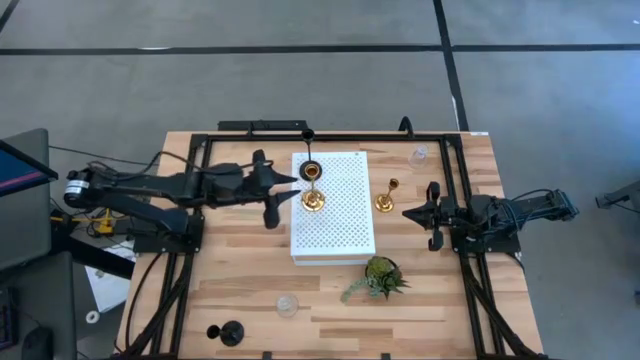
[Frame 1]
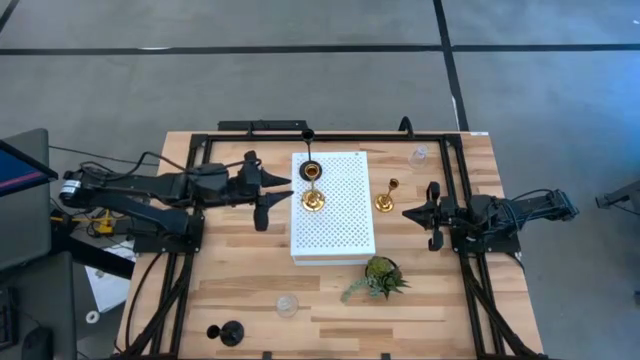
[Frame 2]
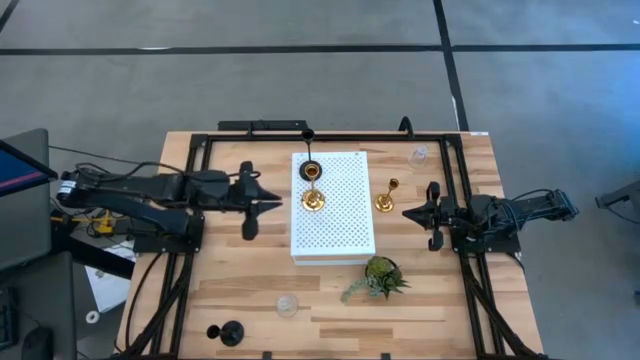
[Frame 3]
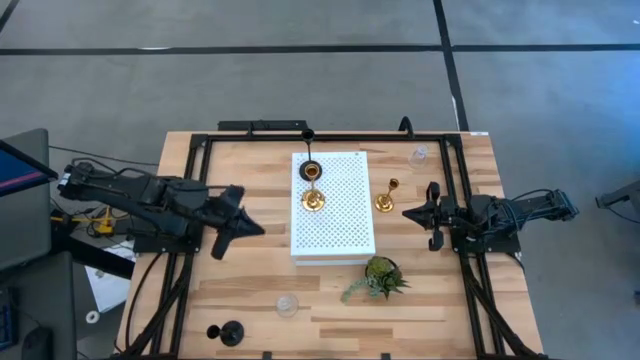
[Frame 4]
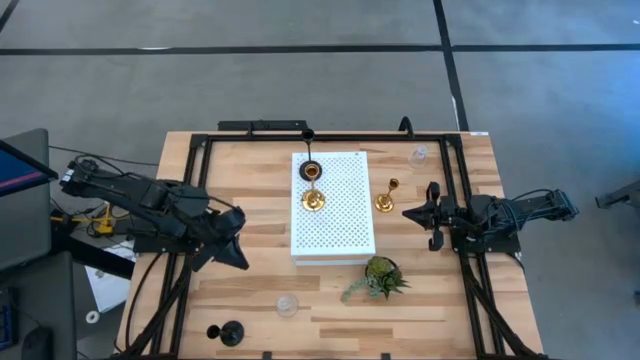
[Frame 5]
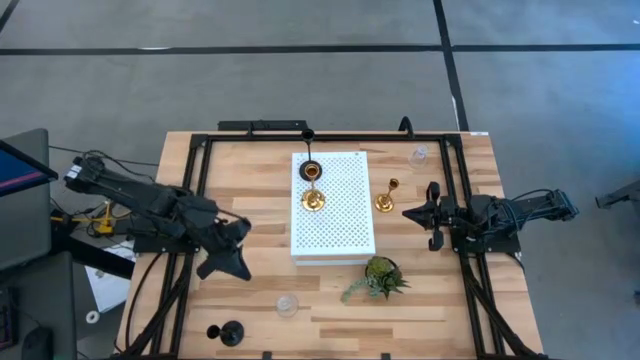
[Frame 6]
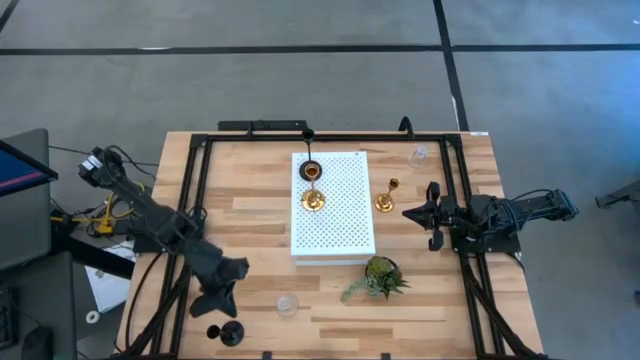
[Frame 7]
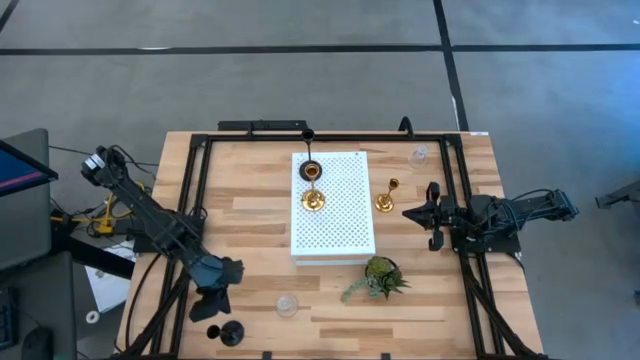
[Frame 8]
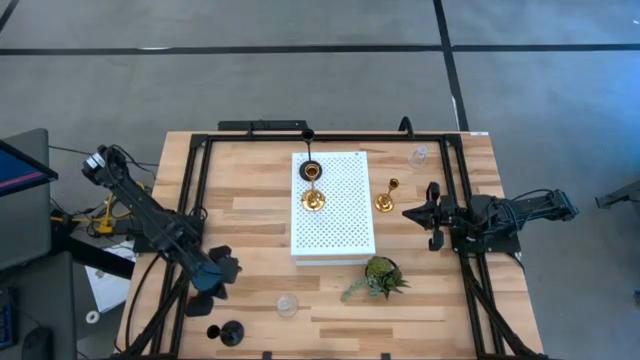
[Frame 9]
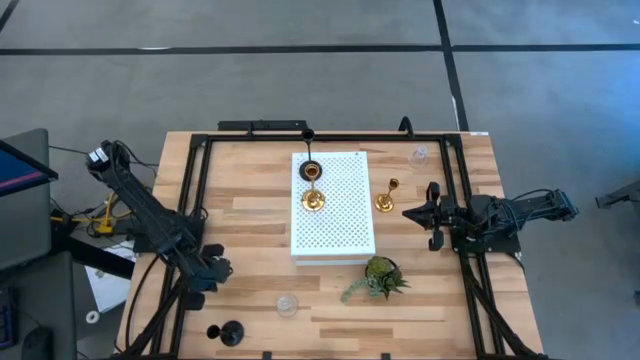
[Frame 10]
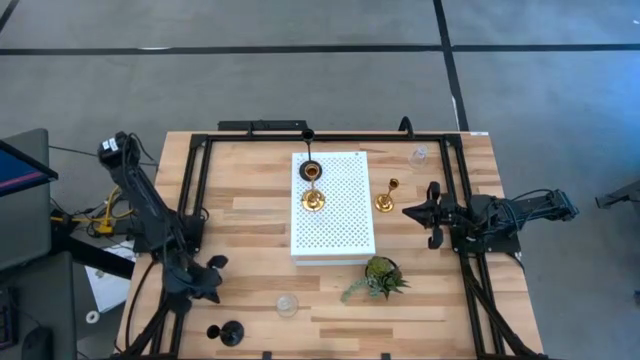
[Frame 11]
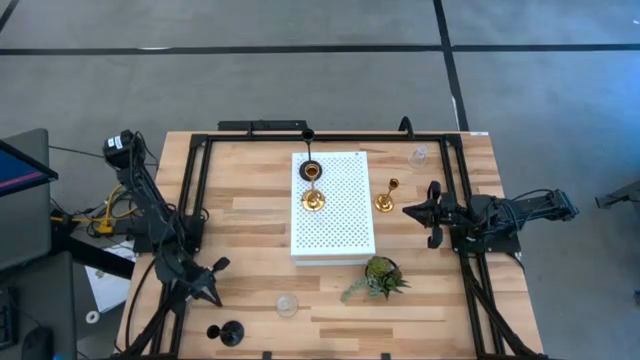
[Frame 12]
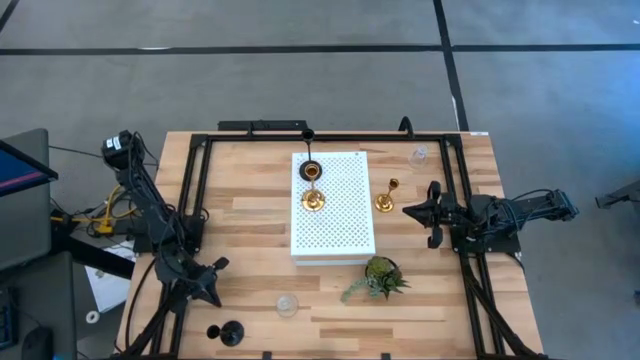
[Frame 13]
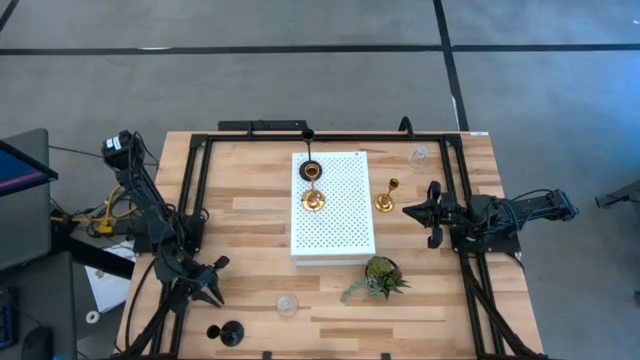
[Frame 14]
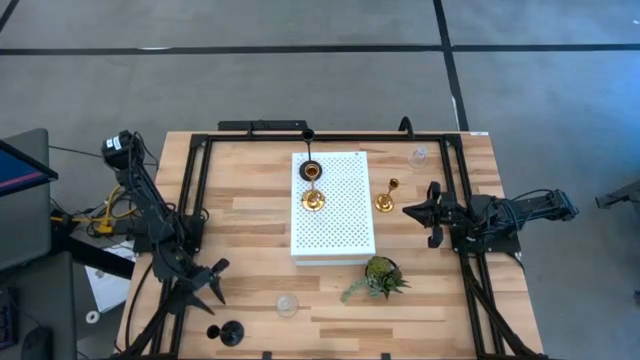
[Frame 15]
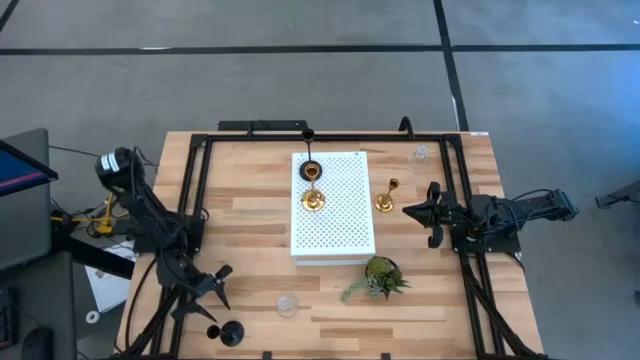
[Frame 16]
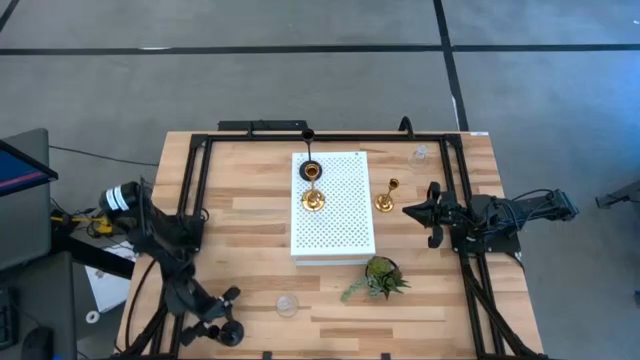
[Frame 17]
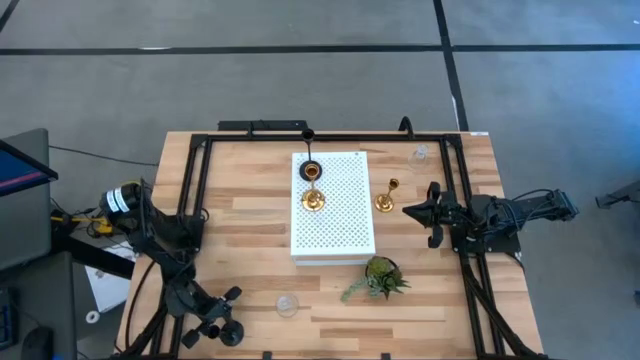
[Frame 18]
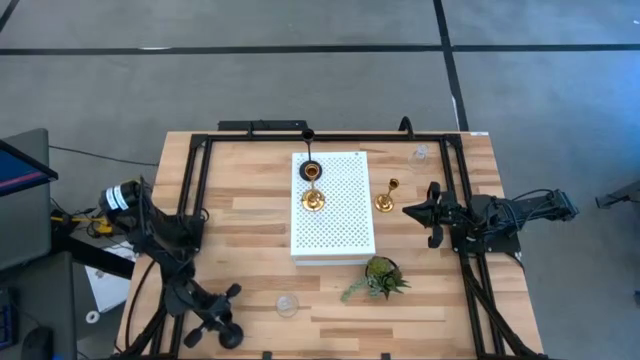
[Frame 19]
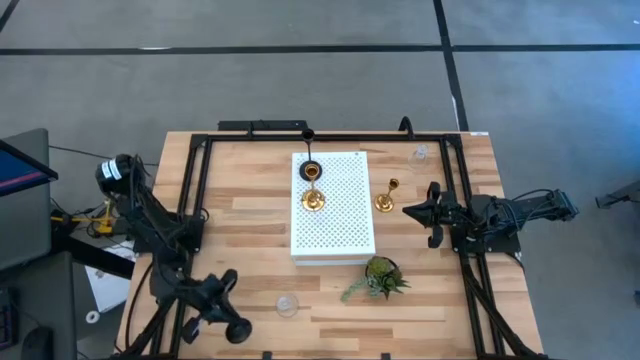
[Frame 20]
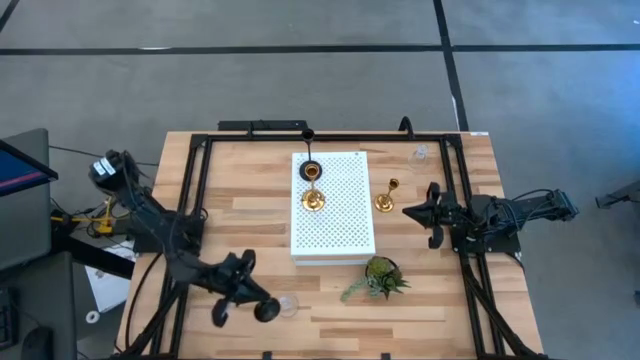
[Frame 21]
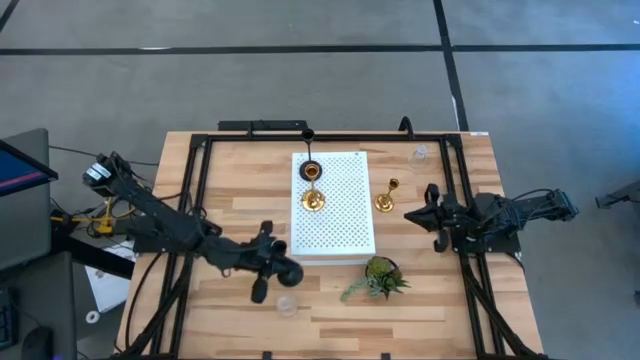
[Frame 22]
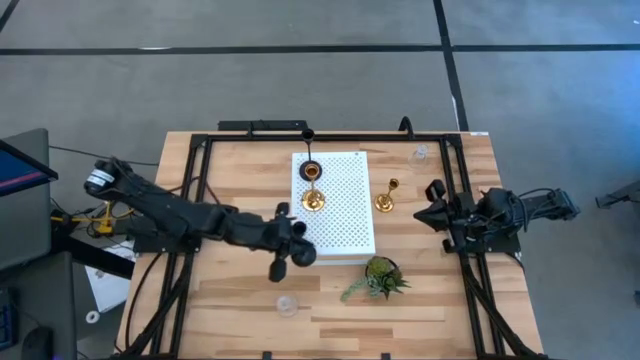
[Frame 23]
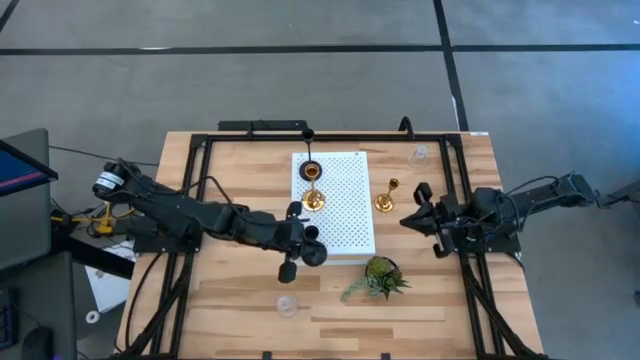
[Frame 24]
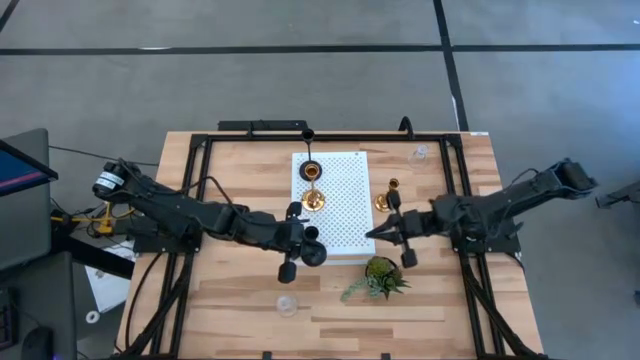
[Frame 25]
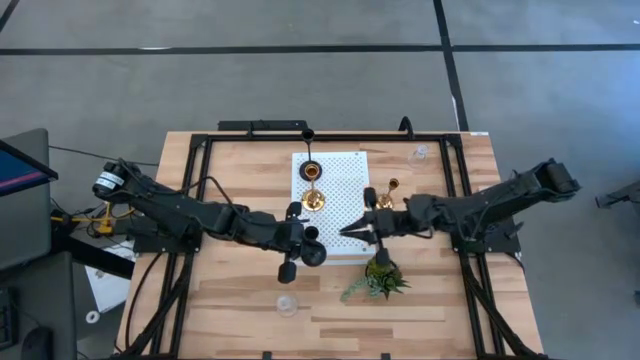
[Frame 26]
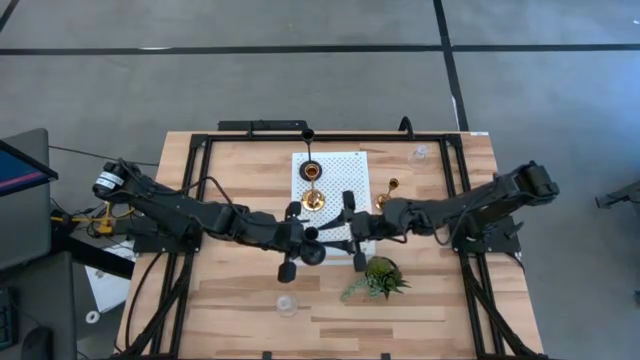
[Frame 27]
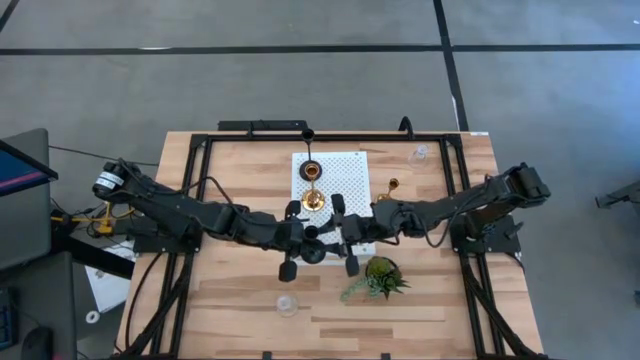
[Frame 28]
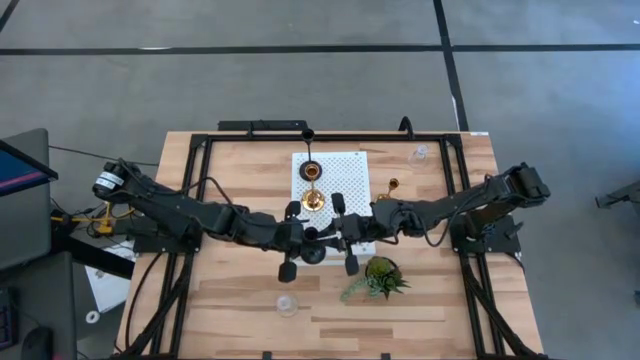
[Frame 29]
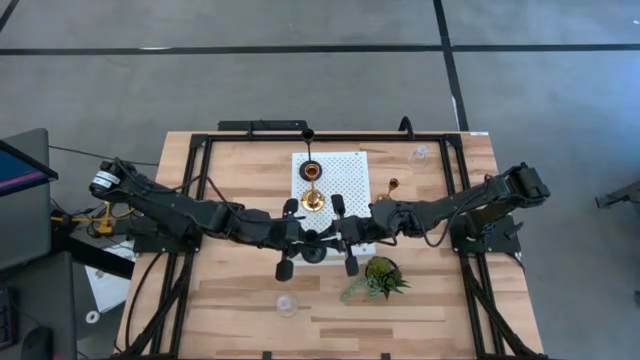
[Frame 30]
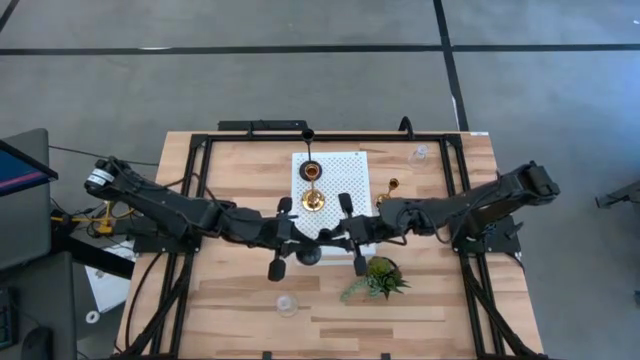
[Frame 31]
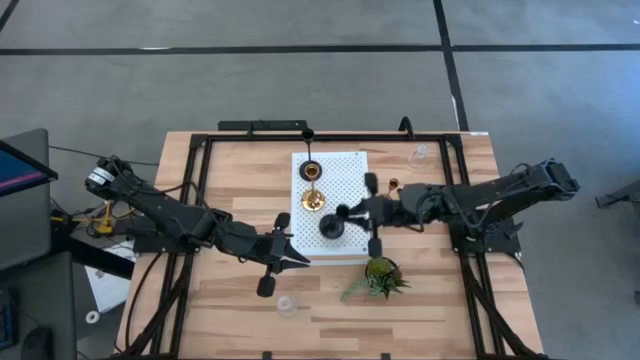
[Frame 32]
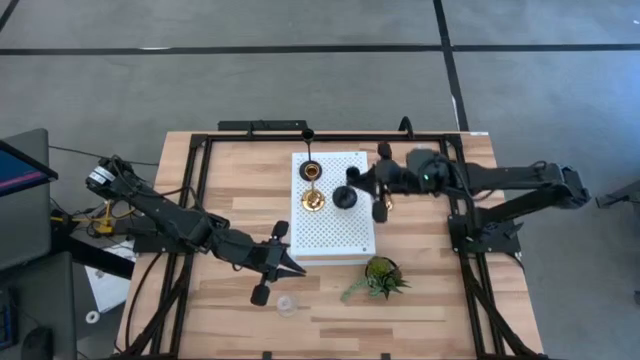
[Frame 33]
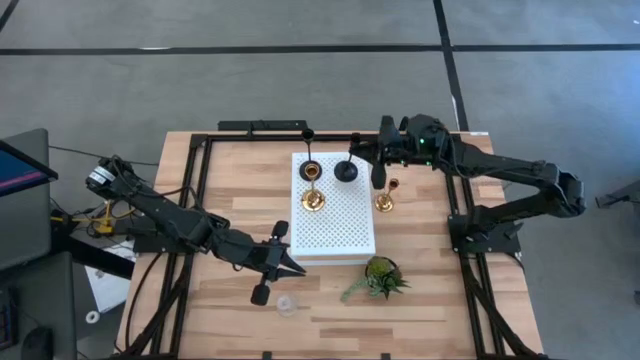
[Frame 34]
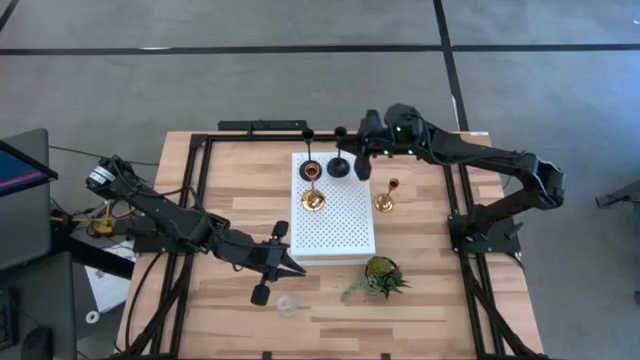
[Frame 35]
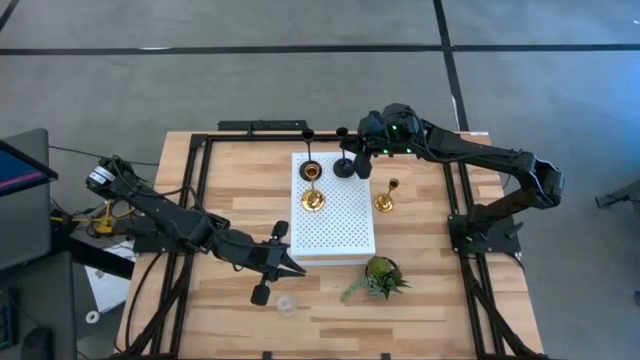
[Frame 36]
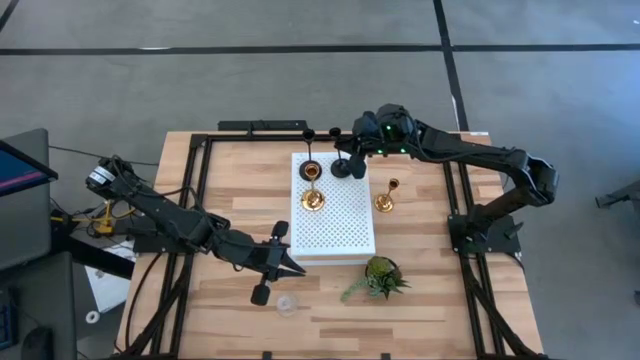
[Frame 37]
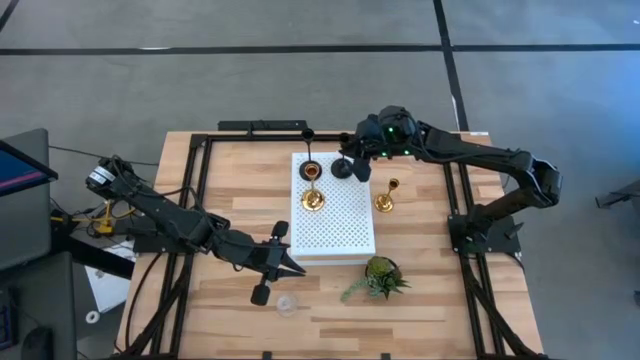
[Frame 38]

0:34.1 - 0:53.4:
Task: Pick & Place candle stick holders
Put the black candle holder on the shelf
